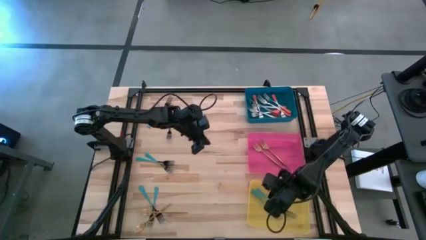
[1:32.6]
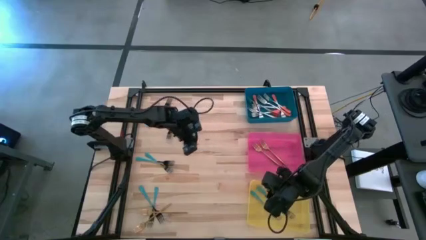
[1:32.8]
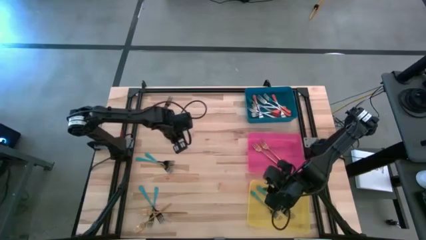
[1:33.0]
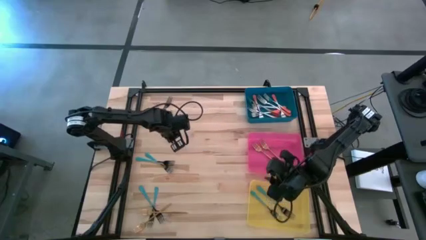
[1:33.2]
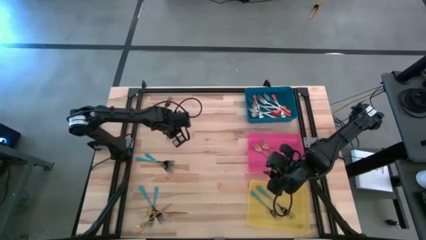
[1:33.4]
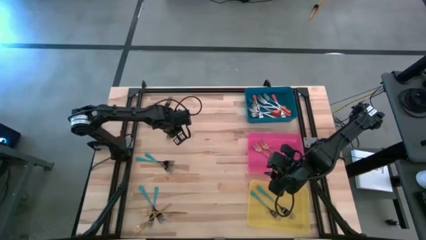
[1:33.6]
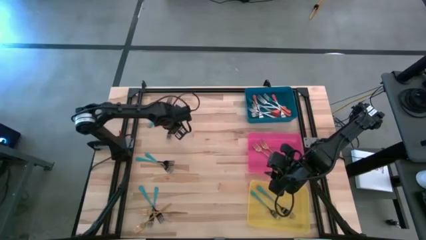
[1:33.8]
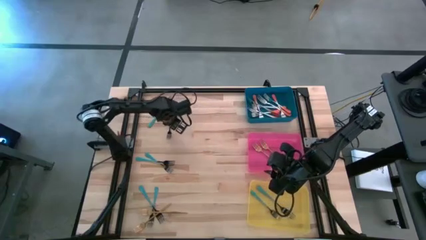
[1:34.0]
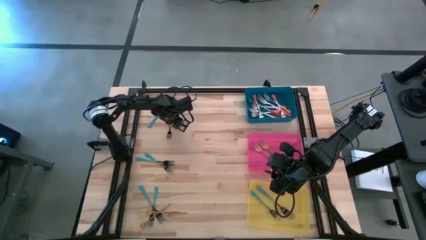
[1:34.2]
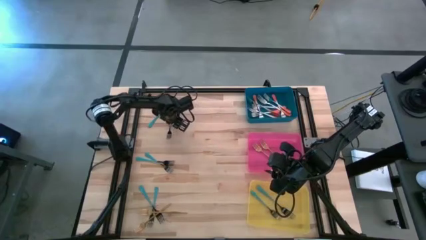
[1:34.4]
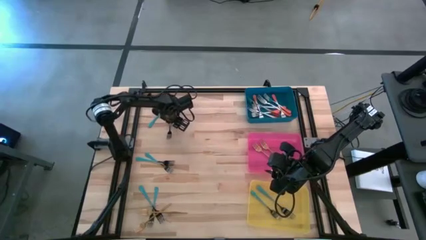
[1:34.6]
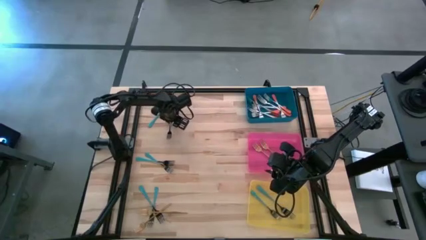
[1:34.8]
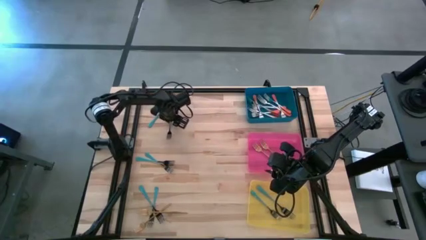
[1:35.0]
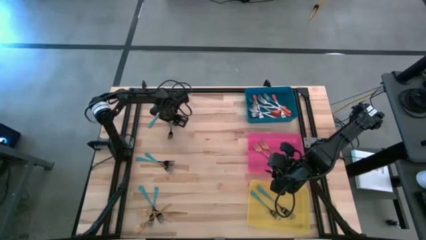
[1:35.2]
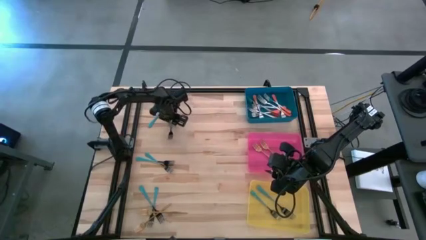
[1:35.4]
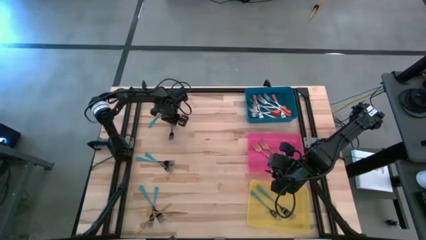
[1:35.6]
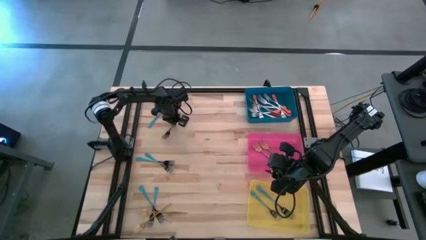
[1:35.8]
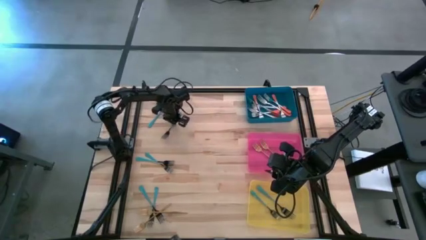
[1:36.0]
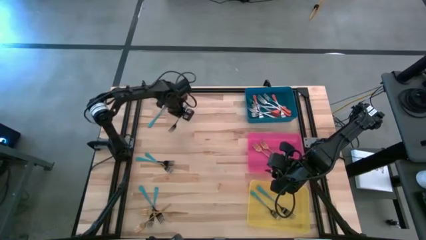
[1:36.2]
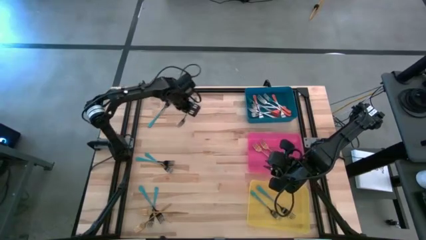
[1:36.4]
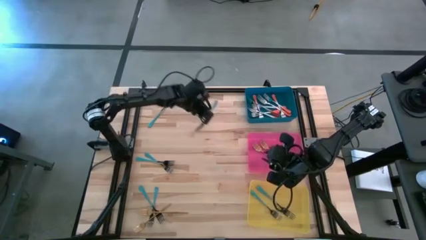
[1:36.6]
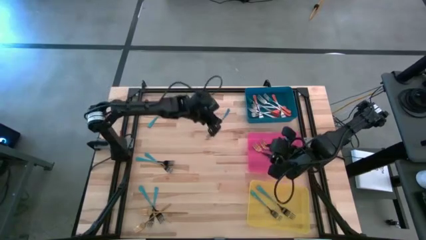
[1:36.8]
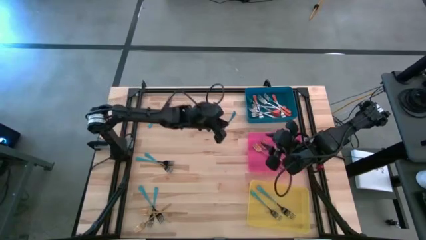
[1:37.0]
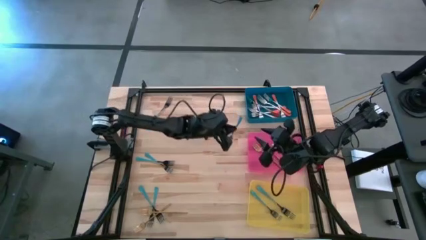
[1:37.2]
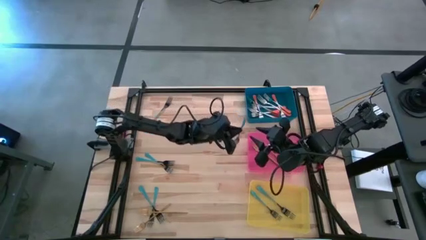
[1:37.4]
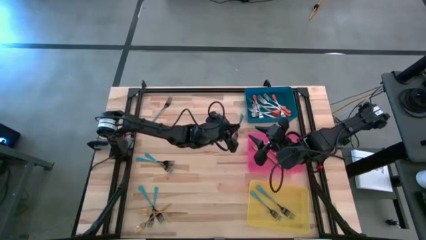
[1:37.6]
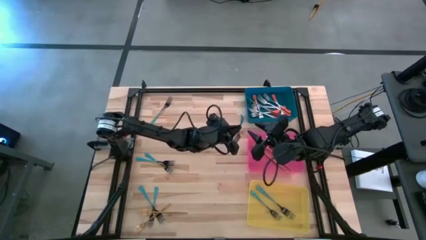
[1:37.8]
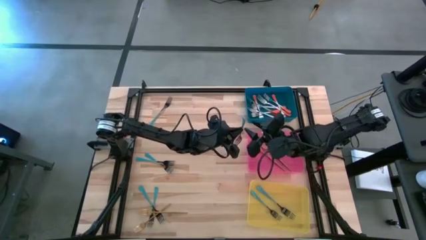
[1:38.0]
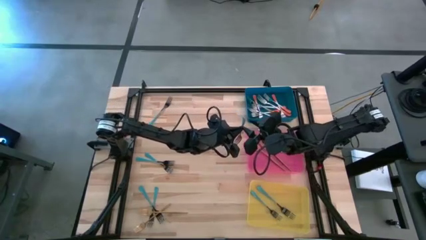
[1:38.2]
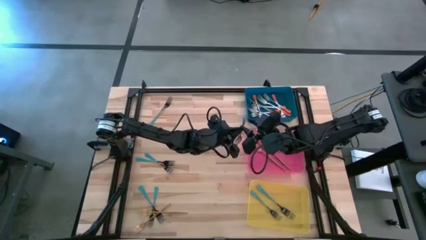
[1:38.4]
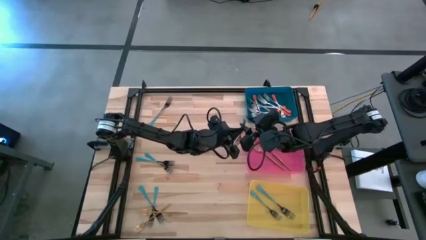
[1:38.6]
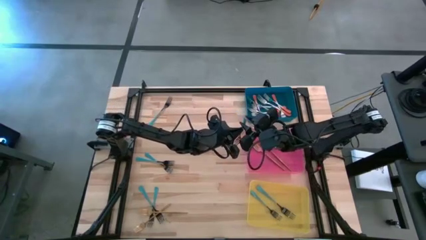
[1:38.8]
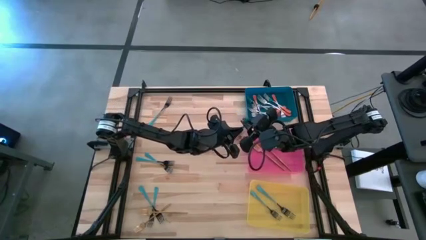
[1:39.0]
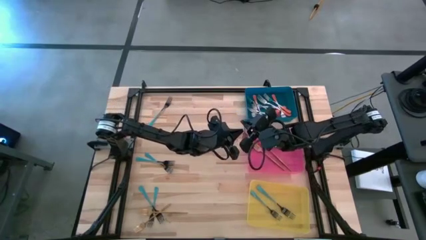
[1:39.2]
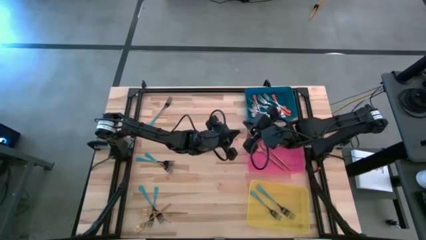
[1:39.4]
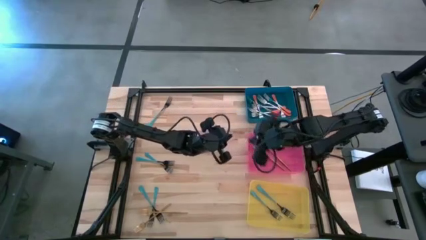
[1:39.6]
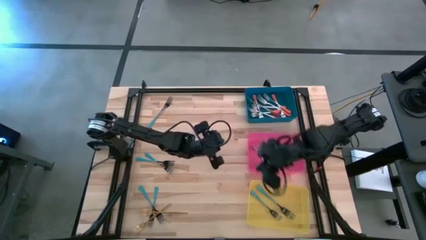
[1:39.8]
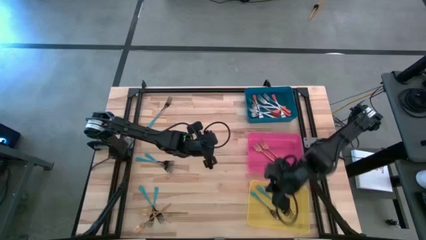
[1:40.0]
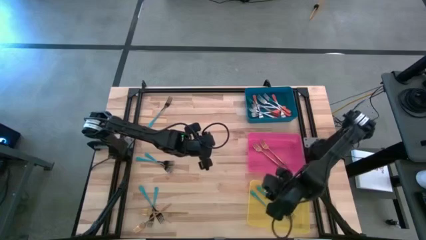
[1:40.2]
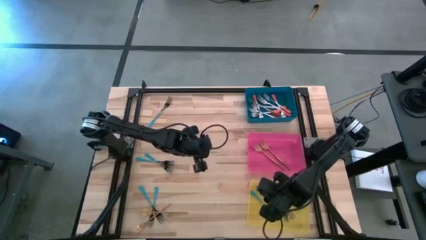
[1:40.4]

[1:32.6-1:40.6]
Task: Sort silverware by color (type)
Put the blue fork into the yellow bin

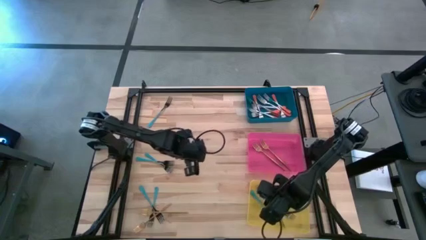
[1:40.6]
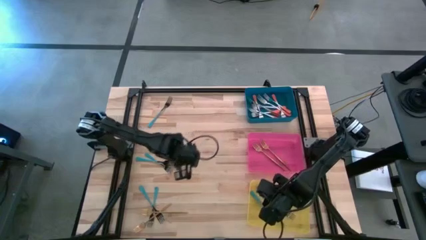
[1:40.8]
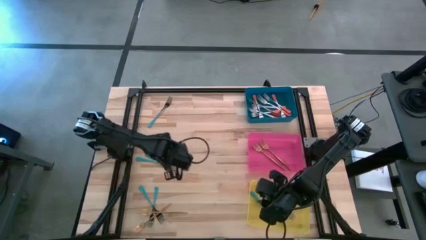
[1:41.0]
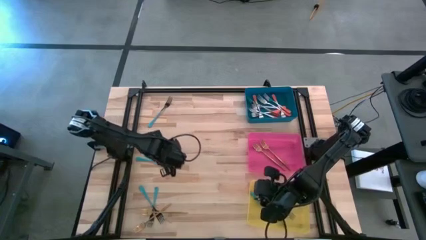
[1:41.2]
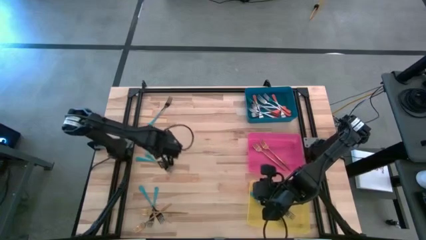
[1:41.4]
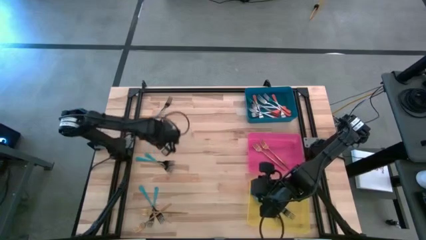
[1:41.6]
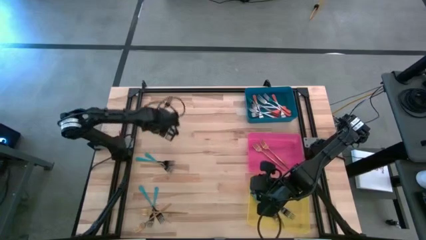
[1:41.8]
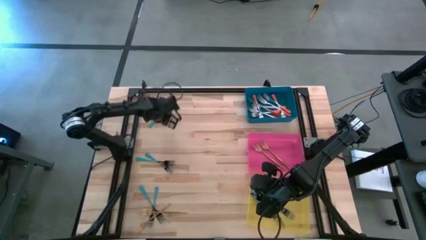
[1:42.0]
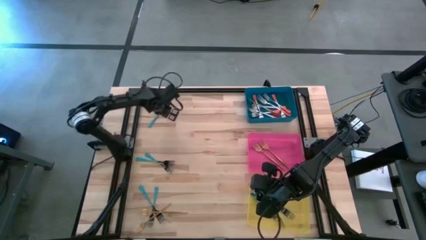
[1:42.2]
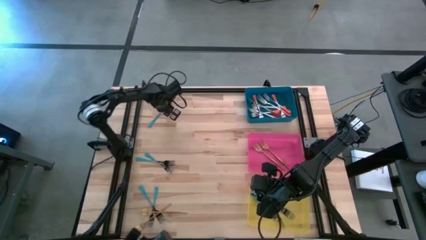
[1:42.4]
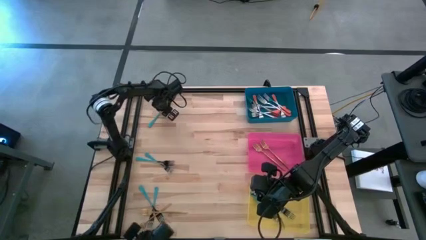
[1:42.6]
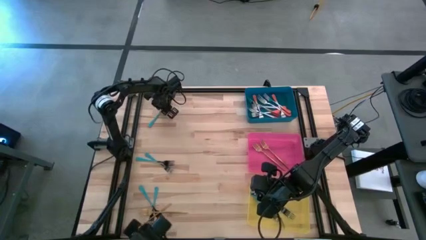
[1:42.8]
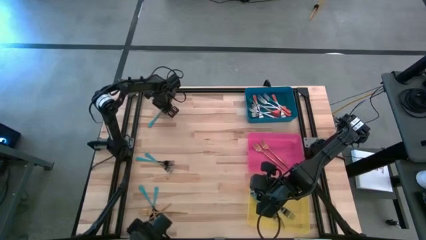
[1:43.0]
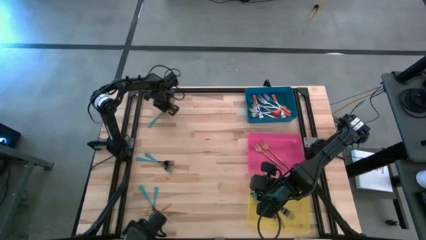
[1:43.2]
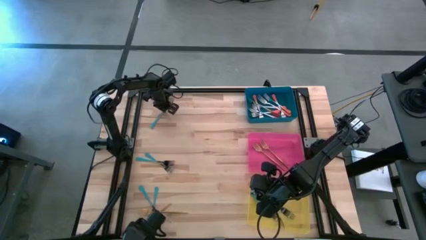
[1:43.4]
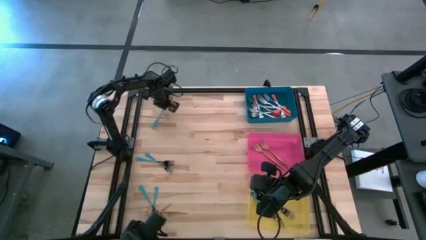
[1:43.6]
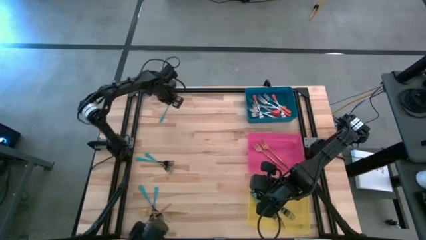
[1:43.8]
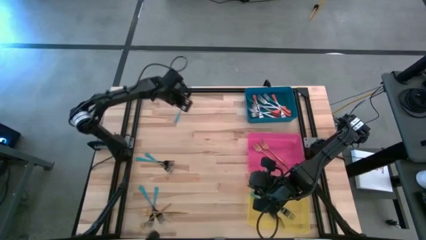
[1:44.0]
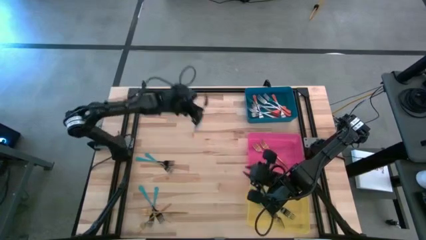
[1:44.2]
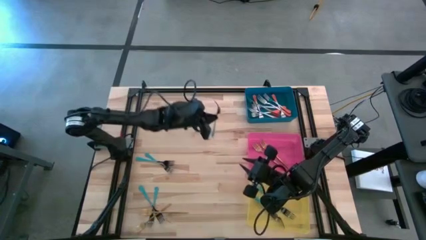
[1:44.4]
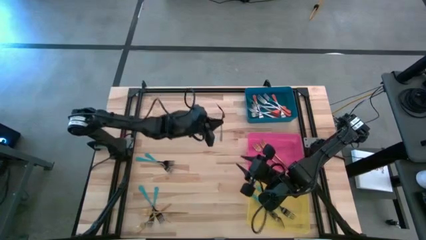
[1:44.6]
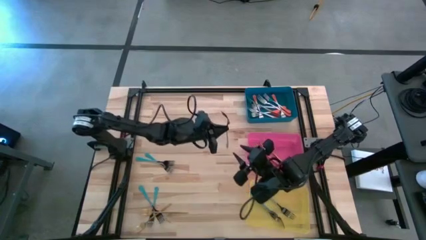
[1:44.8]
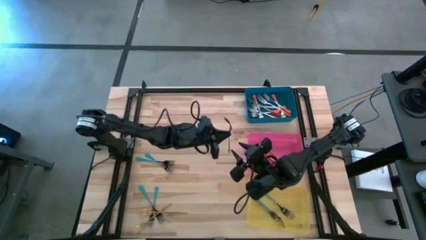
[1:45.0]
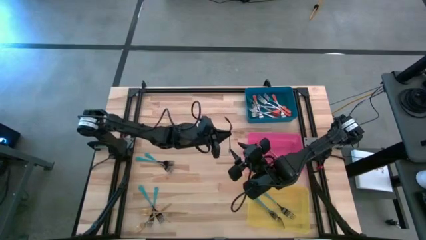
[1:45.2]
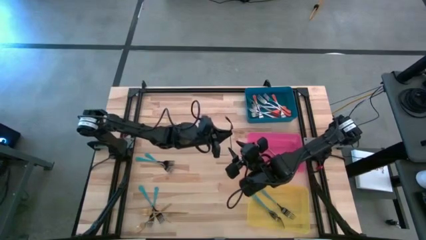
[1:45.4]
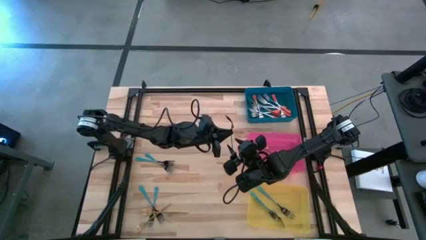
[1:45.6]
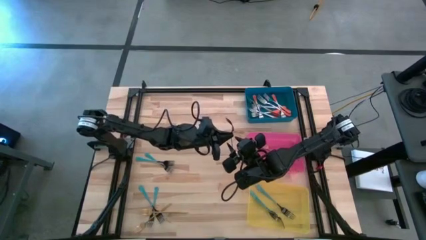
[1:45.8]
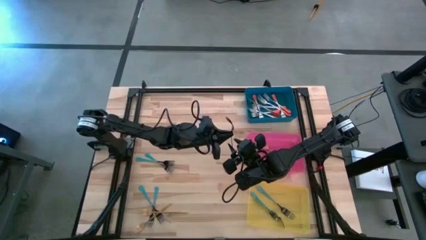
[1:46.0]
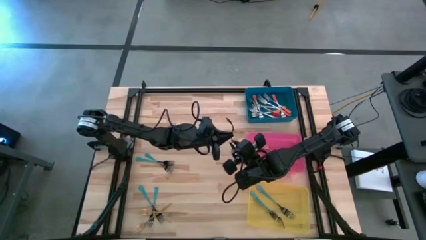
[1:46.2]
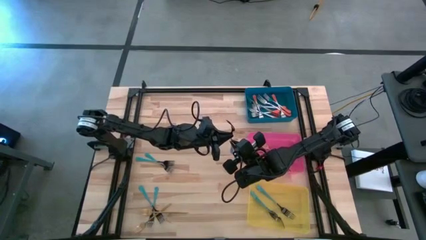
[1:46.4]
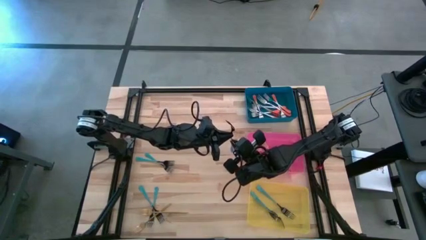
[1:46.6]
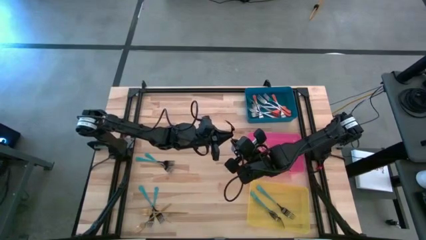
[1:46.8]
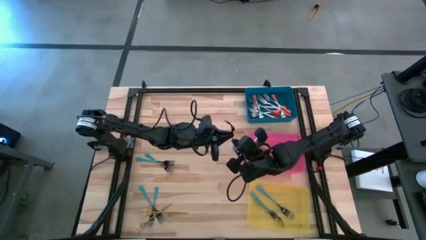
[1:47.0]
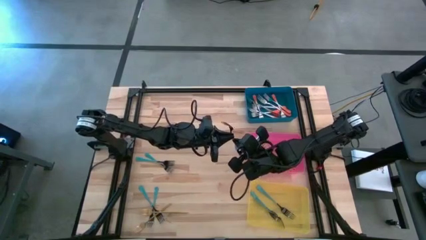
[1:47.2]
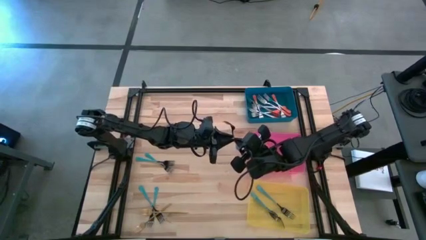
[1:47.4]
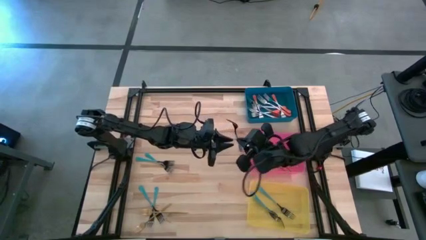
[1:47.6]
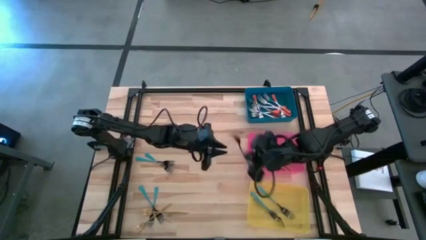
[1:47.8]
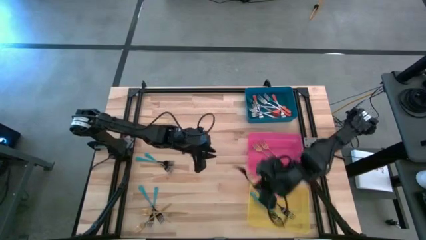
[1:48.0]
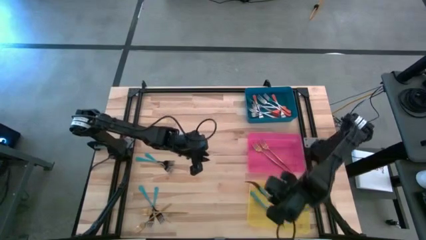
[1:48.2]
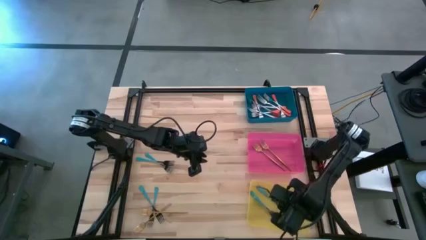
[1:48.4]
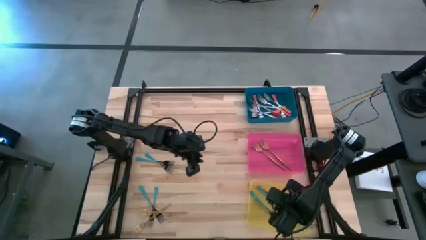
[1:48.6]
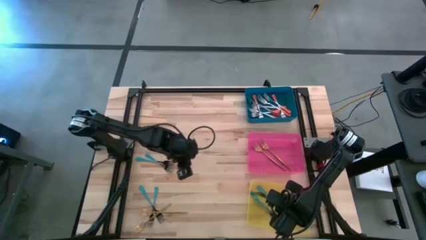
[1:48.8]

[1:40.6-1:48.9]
Put the blue fork into the yellow bin

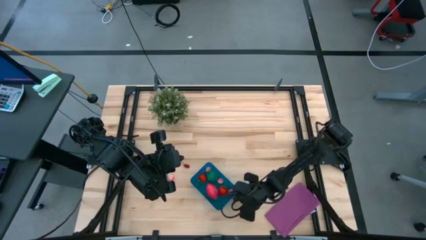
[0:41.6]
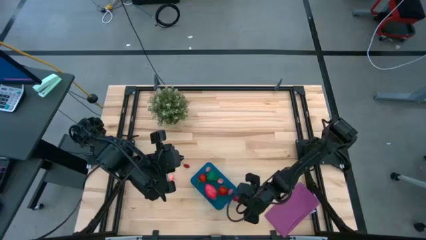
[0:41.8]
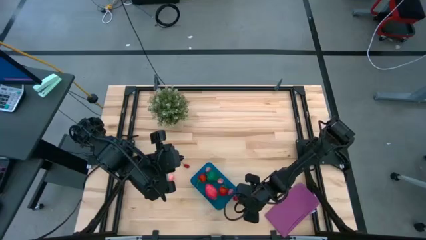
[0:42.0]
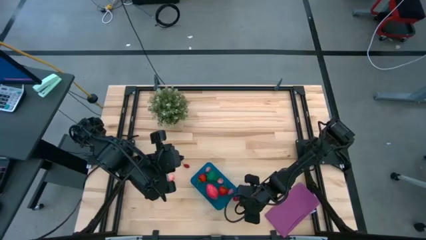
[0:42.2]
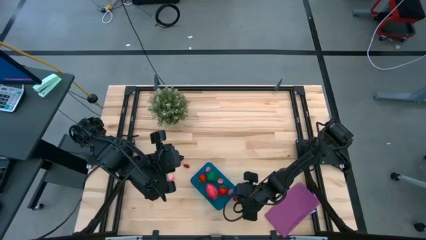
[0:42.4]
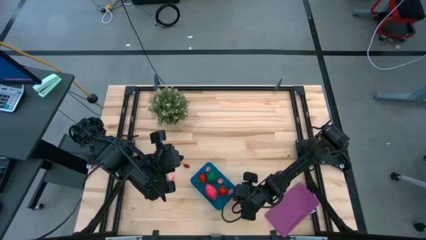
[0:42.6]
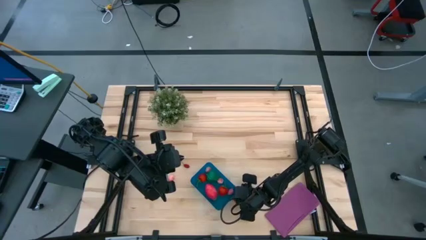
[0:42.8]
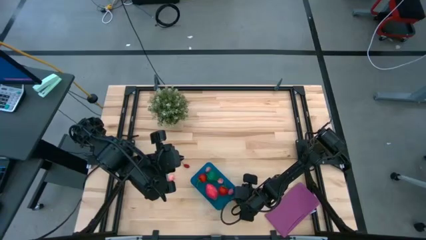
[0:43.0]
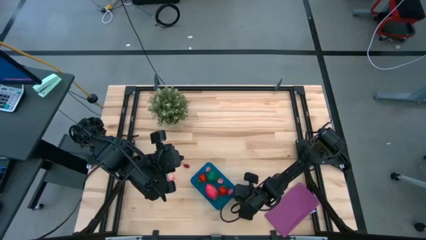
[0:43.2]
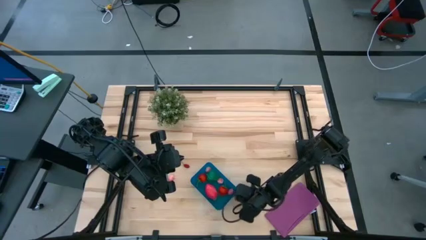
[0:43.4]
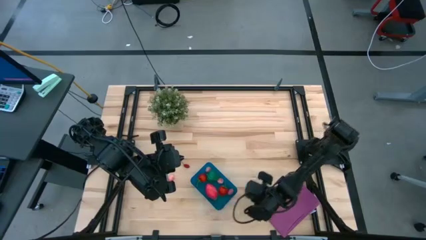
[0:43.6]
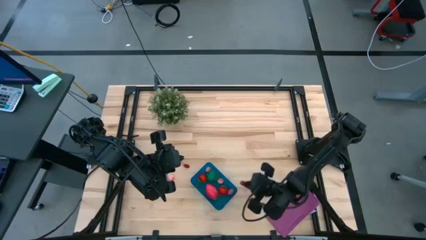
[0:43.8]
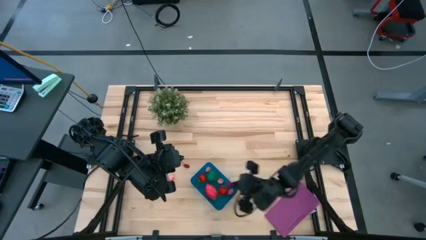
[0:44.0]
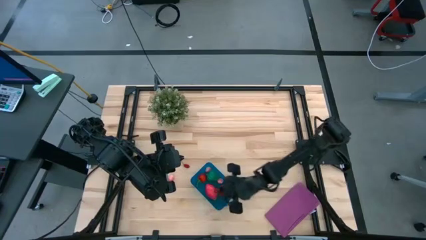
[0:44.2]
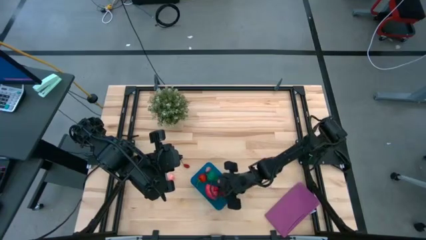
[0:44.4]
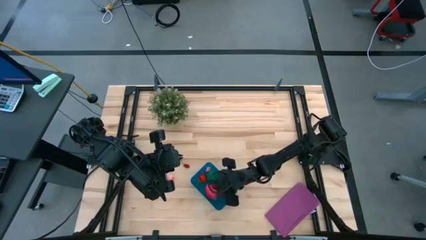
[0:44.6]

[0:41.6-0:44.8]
Task: Pick and placing Produce into tupperware
Put the red cherry into the blue bin
